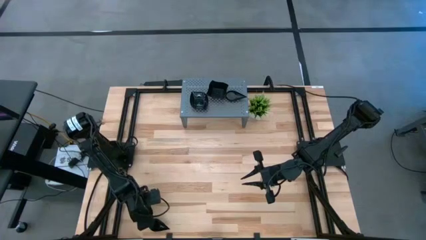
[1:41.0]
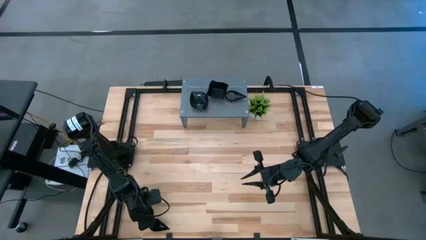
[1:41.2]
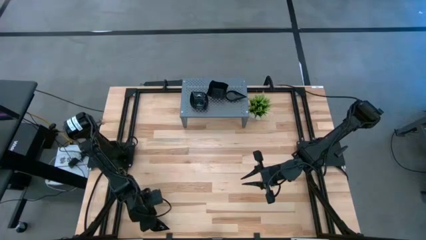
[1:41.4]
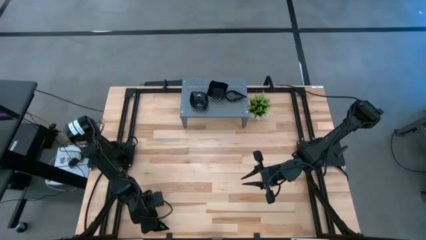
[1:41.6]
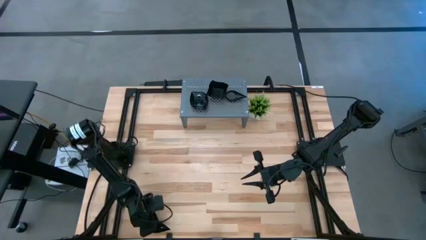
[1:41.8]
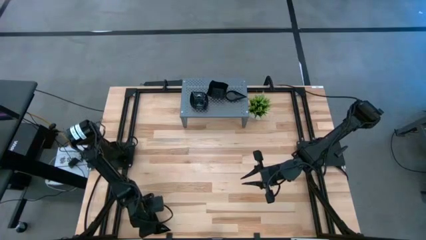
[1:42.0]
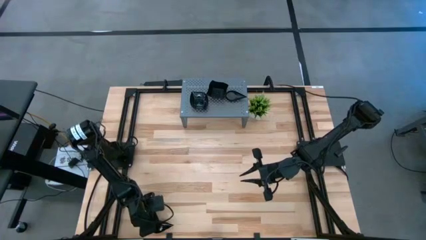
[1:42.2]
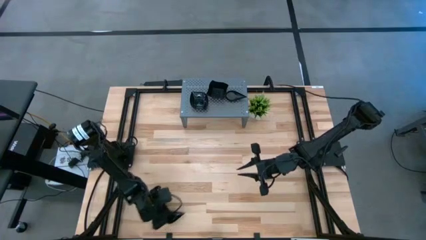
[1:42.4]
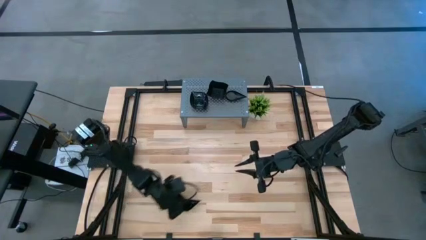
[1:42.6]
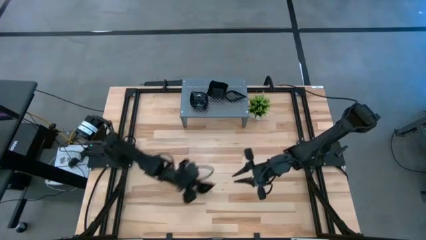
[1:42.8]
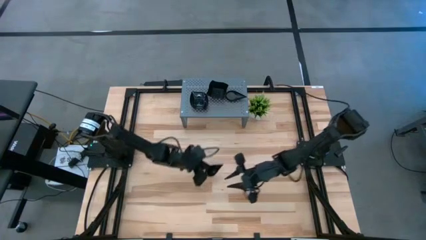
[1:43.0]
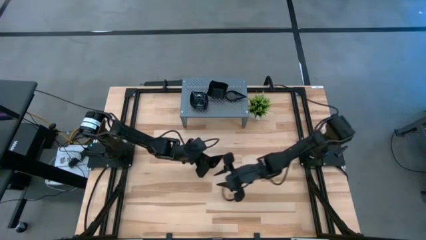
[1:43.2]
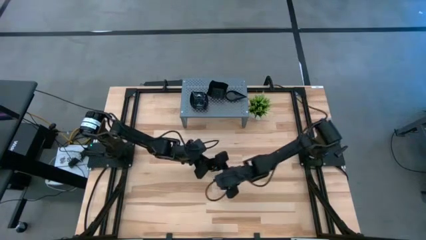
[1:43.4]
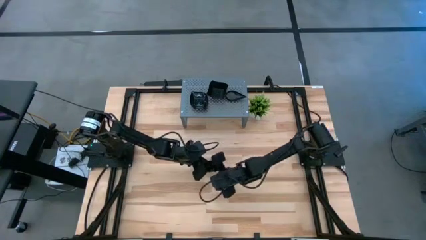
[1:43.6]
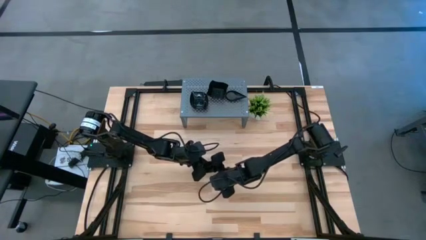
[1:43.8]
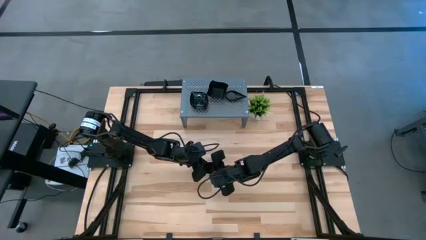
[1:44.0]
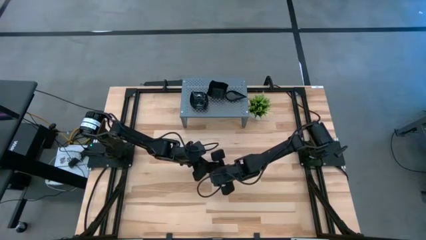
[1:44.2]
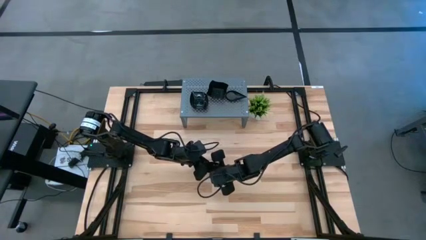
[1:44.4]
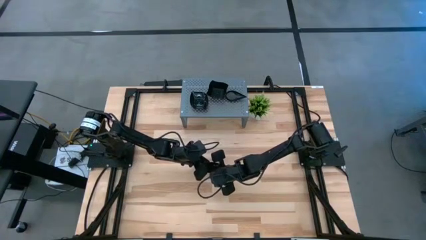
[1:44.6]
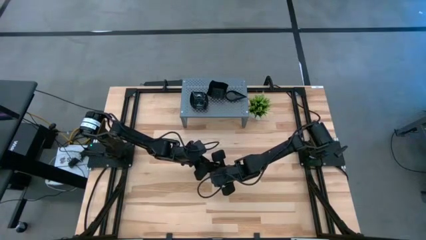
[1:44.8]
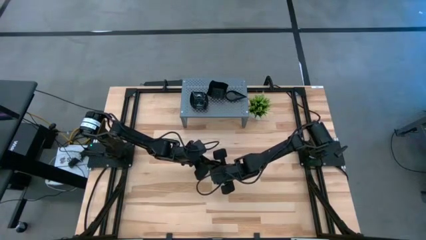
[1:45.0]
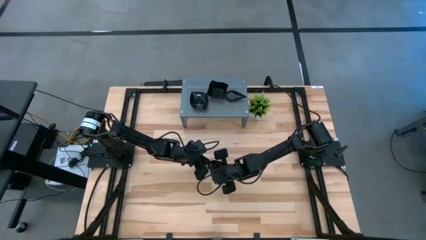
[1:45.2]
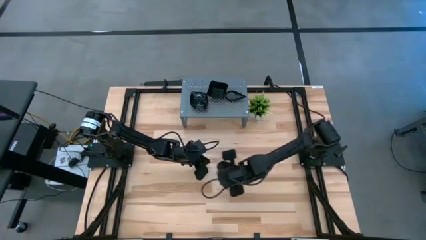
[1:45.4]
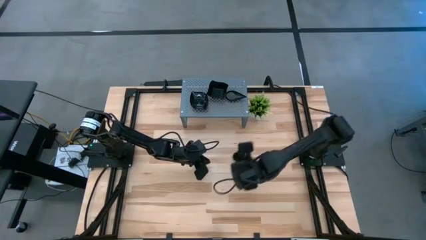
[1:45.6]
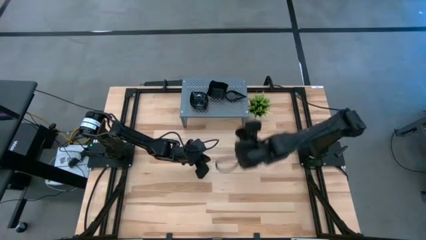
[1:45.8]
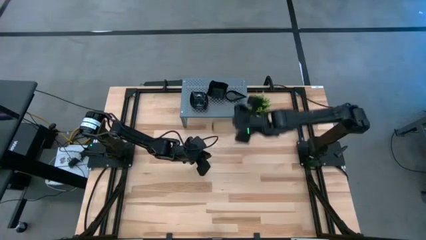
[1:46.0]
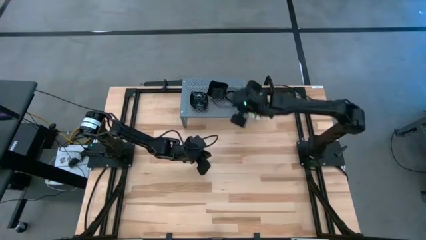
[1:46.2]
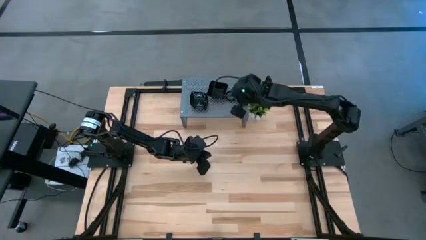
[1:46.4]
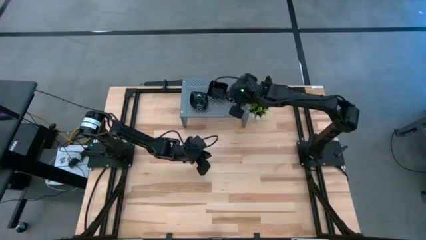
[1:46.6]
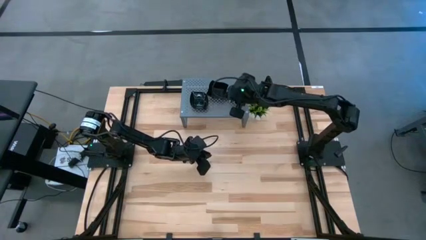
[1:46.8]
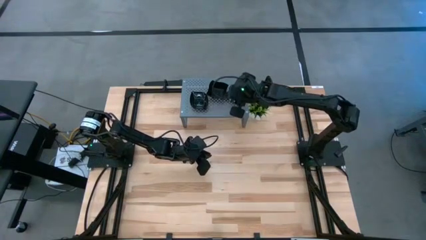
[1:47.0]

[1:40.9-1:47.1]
Task: Pick & Place Mini shaped plates
Stack the black drop-shaped plate on top of the stacked black drop-shaped plates on the shelf

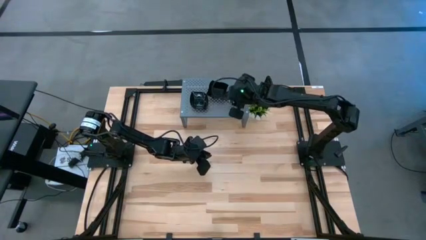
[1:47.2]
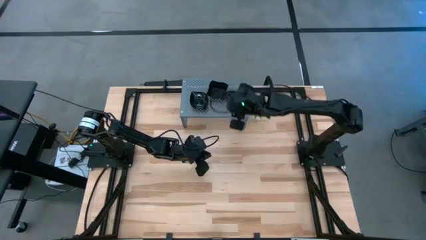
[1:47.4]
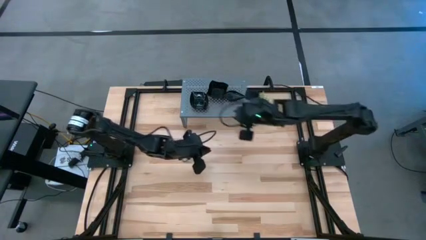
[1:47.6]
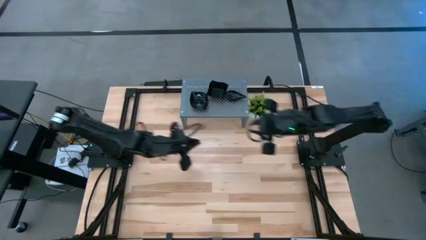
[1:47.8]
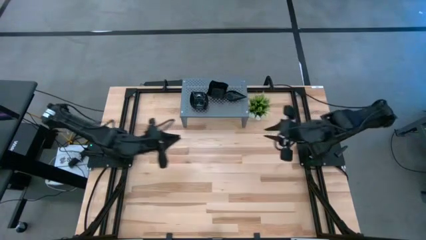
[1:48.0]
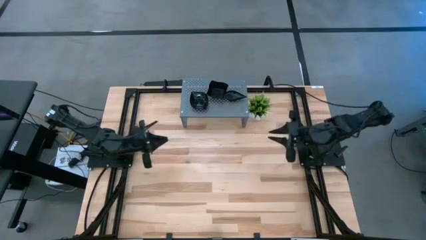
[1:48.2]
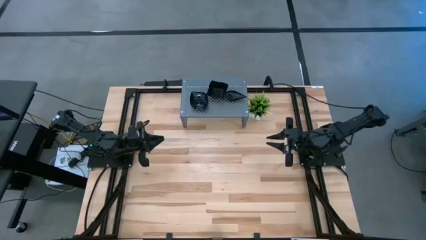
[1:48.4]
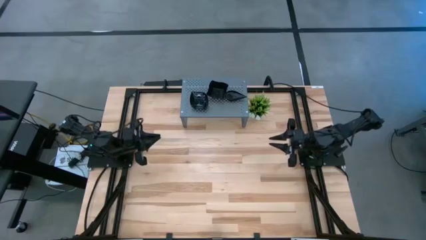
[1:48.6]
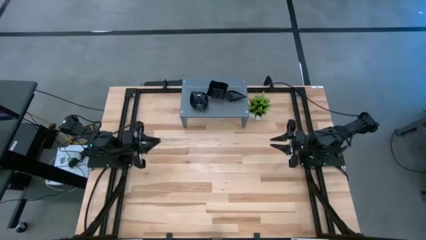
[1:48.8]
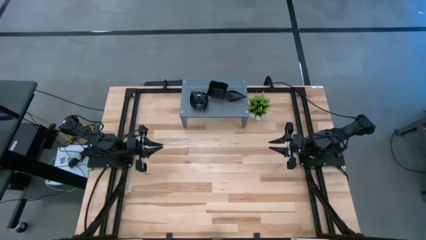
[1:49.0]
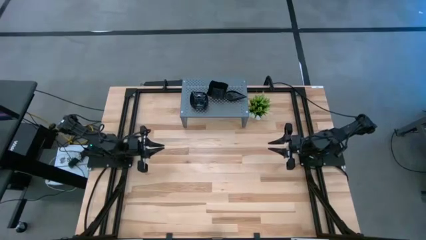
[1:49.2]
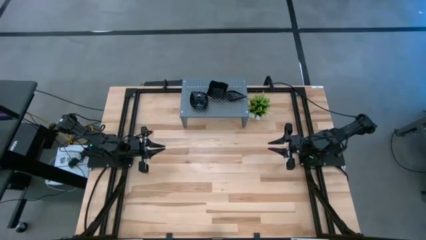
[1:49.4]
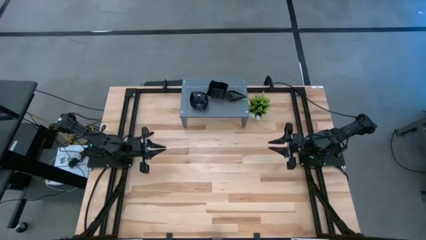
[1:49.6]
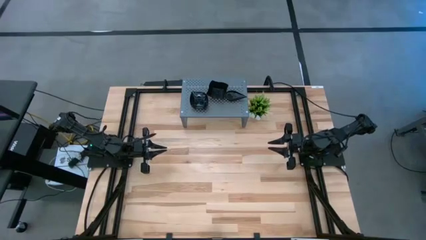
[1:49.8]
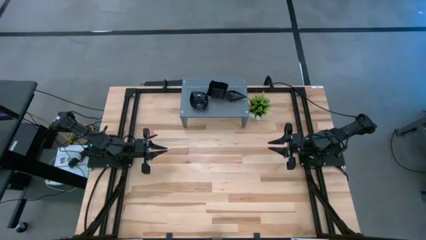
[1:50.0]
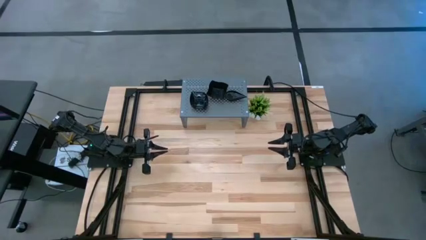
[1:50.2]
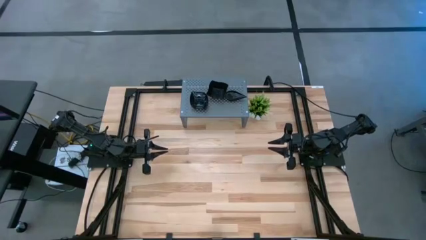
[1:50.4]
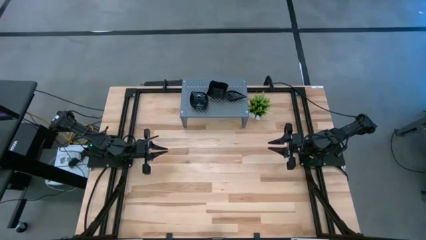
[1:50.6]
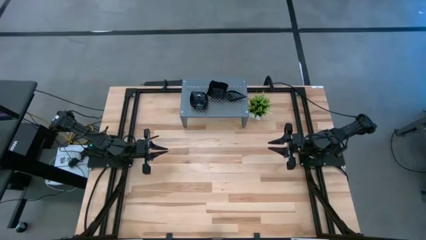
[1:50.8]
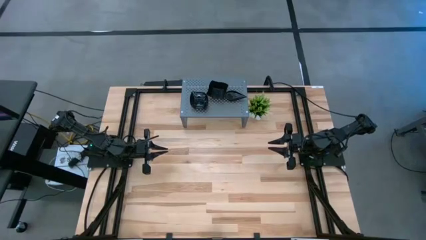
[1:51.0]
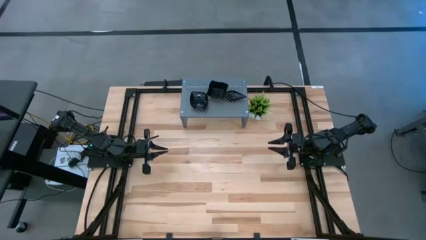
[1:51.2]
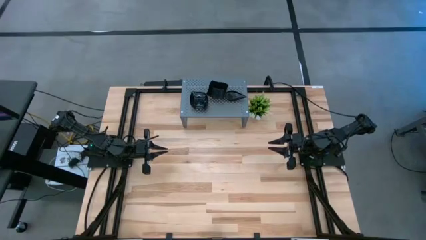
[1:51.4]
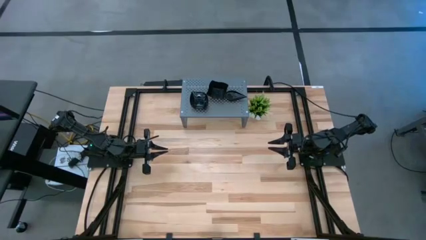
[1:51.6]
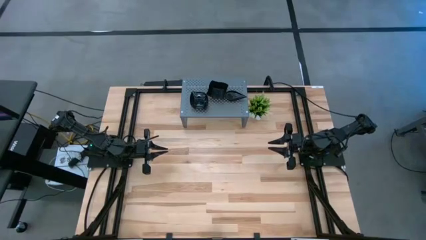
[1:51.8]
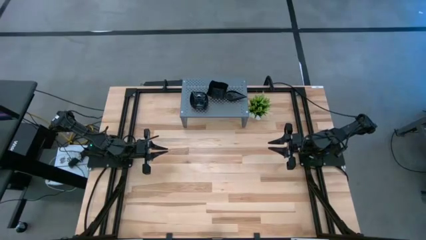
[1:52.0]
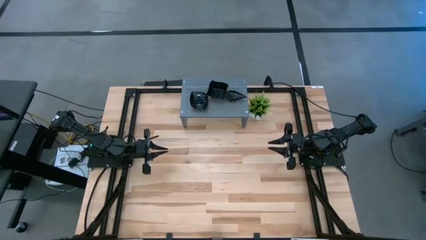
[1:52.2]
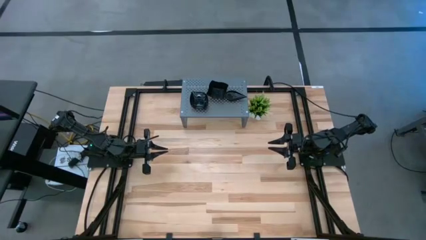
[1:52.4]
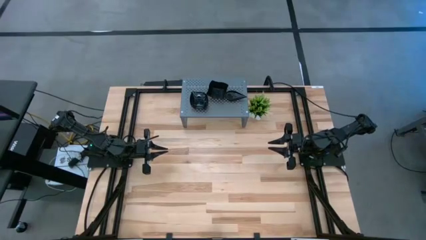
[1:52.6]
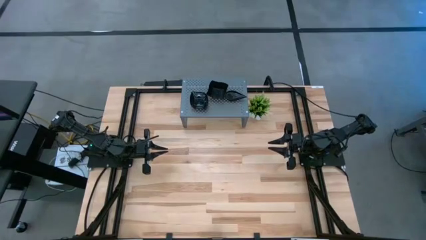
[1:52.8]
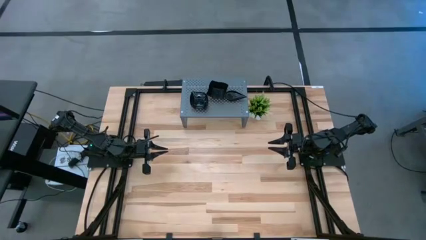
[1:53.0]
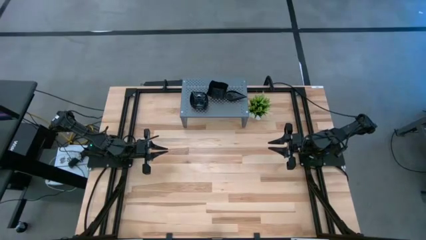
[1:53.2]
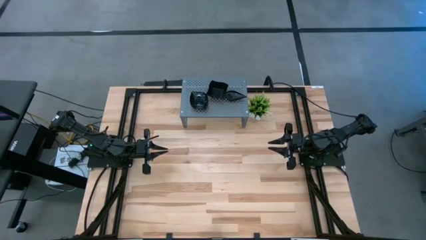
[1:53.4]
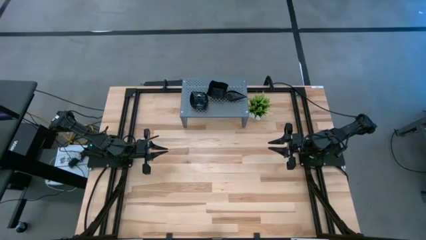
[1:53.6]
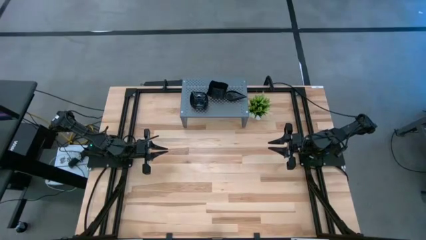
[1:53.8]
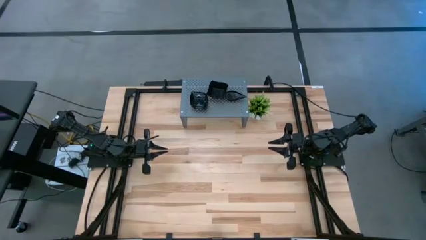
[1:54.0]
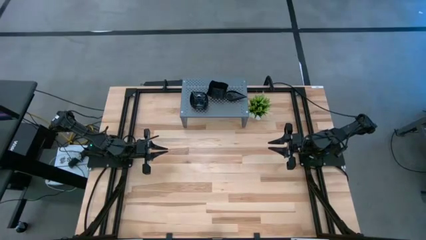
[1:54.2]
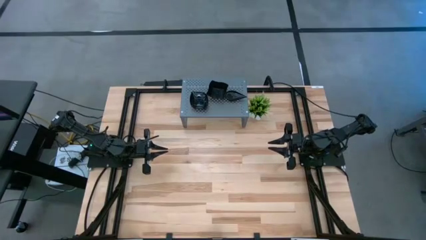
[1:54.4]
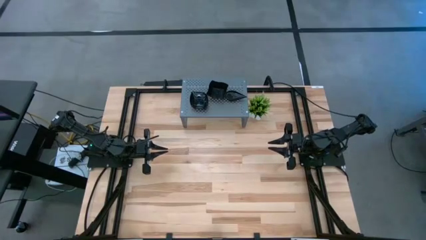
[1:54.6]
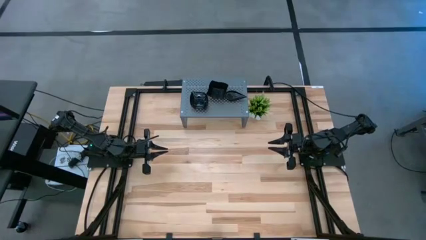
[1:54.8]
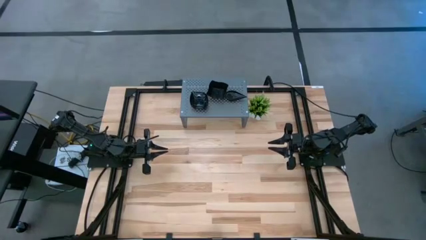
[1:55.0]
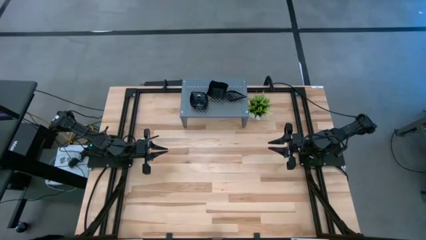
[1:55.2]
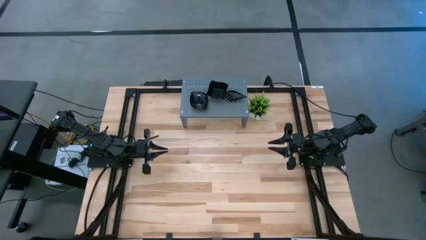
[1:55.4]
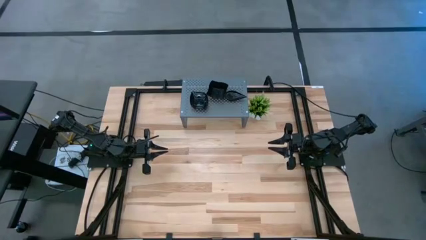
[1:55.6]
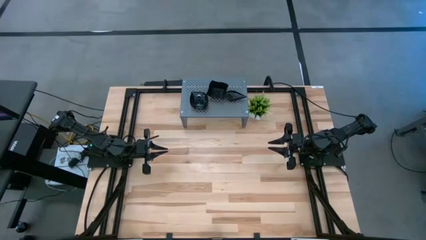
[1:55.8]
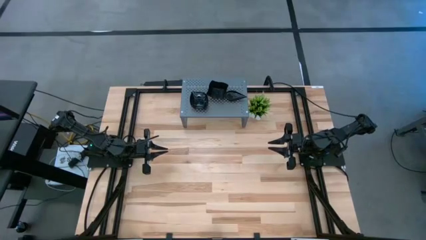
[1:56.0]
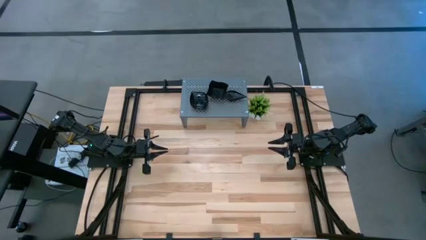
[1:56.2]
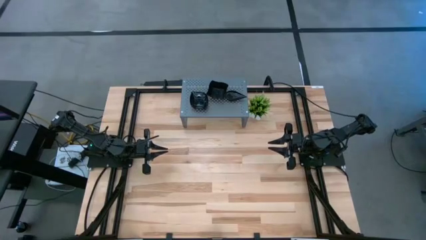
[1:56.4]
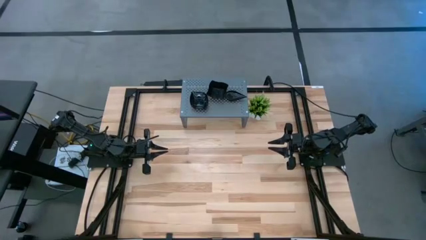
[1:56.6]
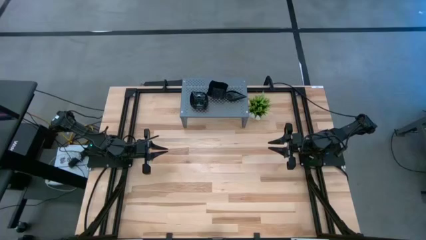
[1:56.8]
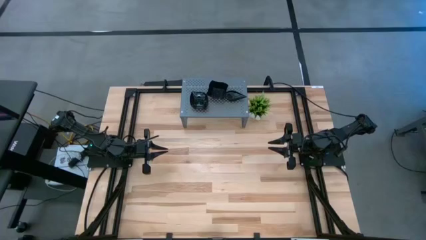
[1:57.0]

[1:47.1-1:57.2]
Return to Home Position

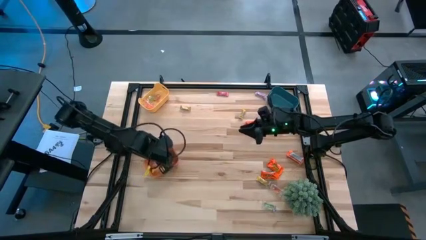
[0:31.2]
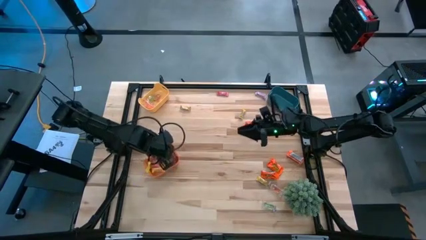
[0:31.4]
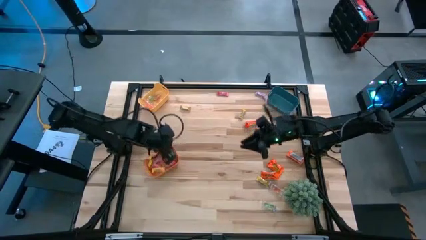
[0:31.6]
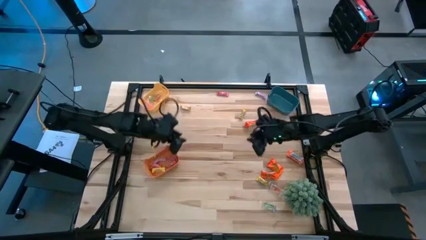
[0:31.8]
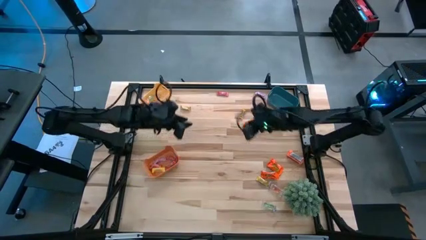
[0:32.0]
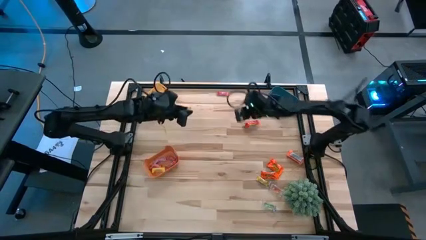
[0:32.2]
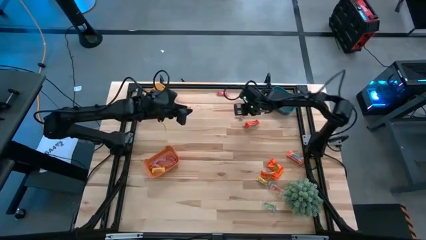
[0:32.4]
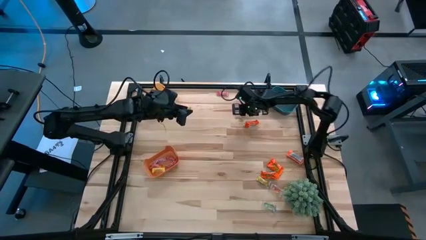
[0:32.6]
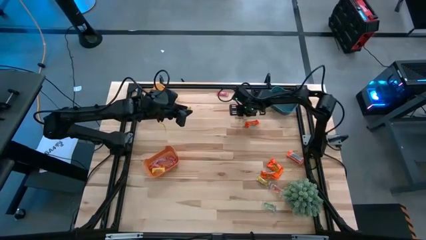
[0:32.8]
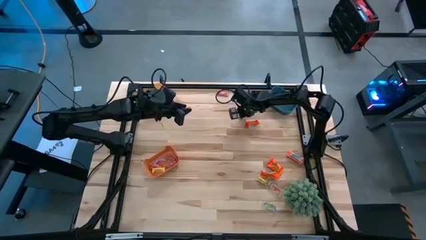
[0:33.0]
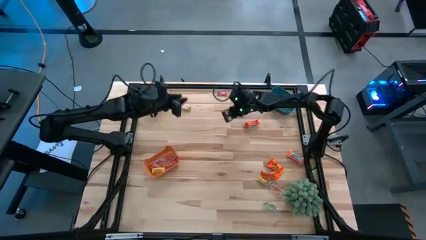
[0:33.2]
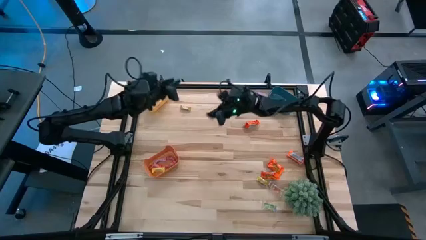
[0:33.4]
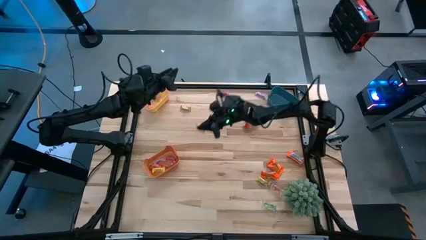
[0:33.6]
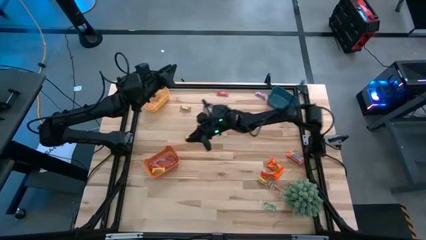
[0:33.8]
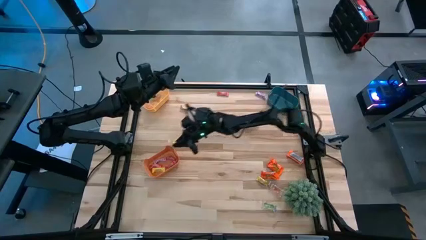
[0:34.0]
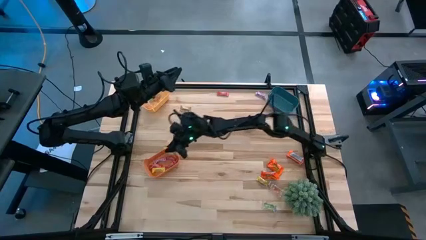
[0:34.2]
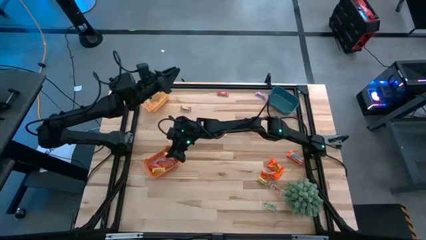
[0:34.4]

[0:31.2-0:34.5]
Task: Sort candy
Put the top right yellow candy into the orange bin
